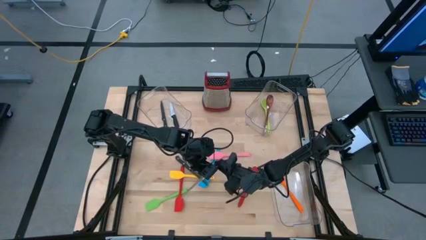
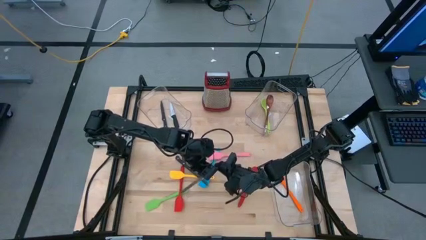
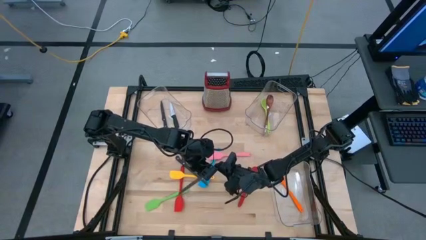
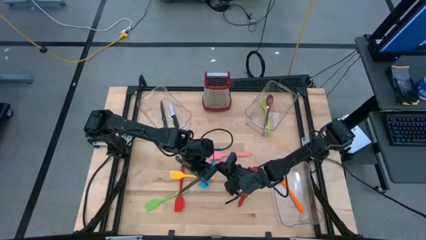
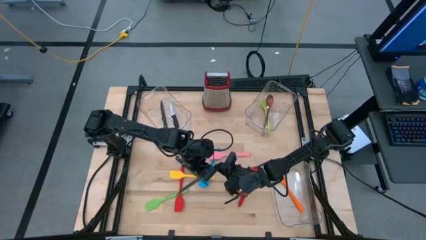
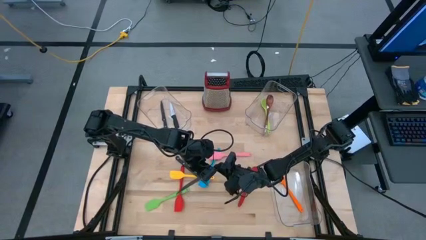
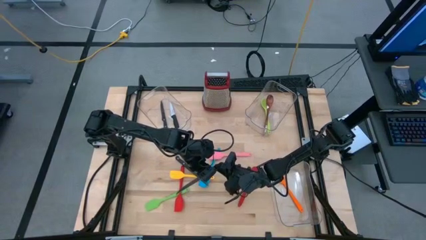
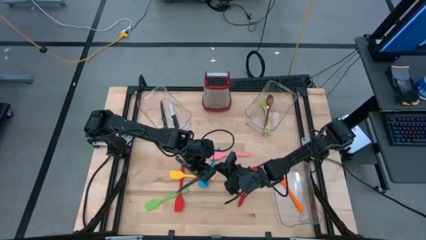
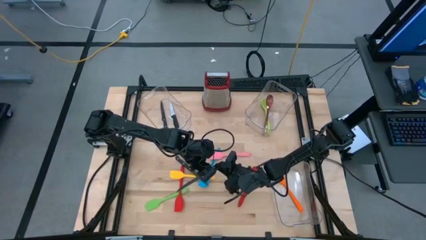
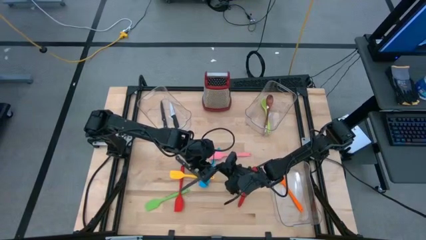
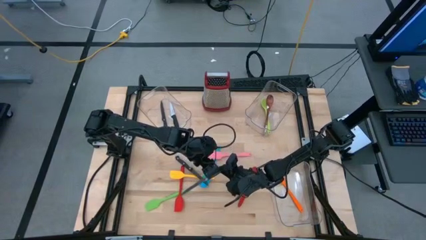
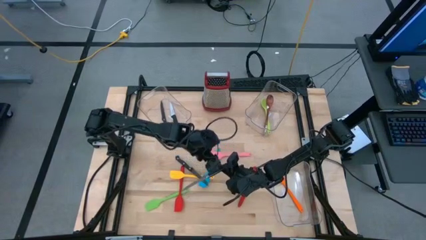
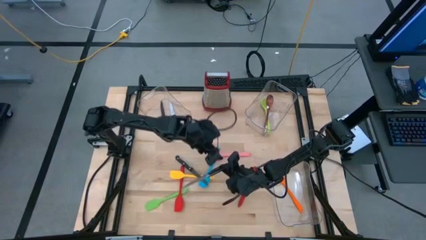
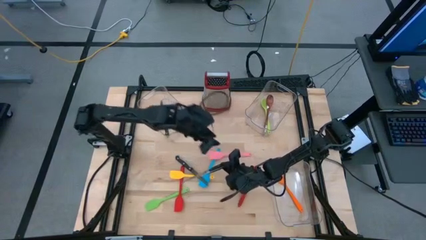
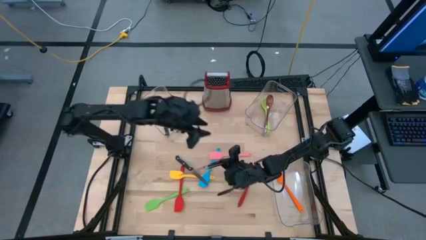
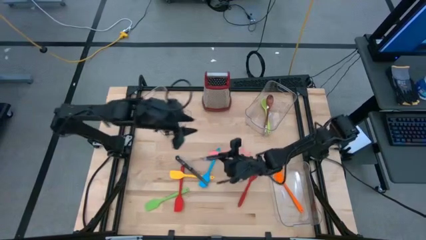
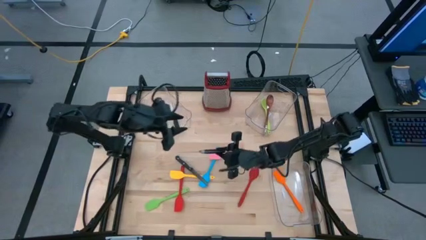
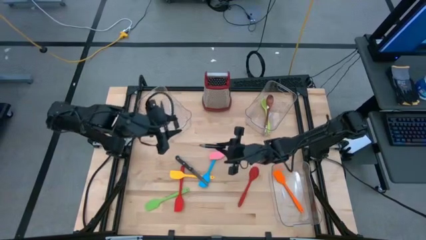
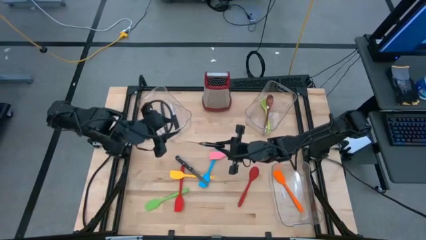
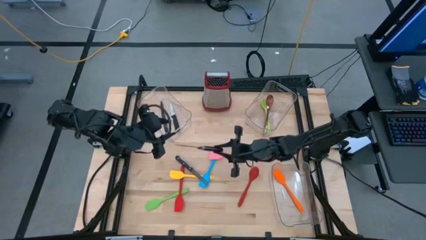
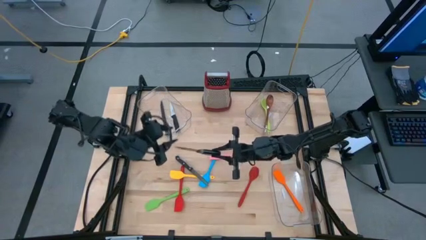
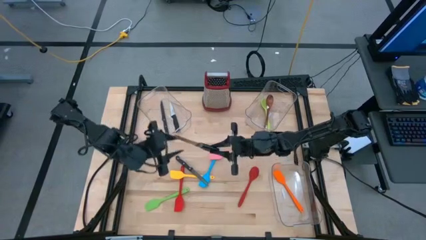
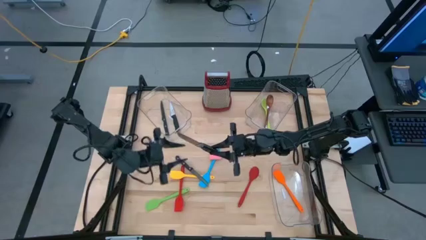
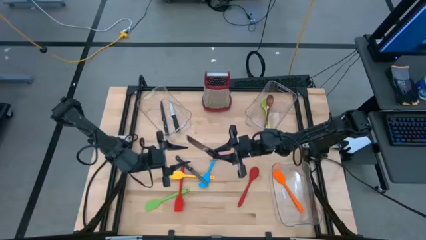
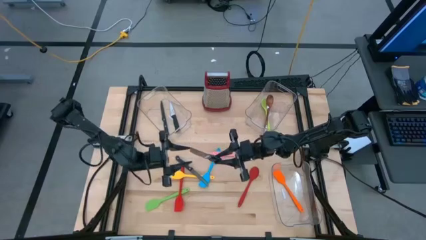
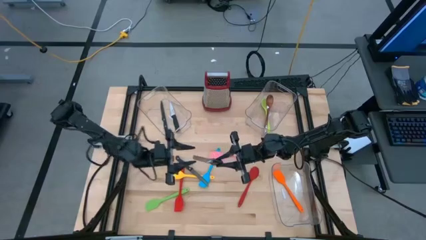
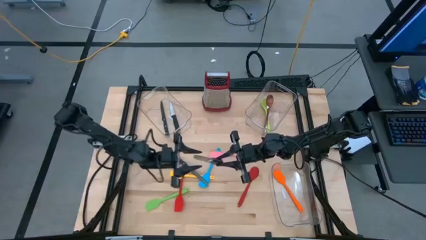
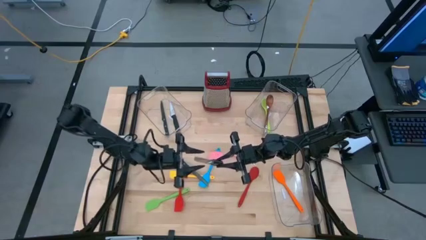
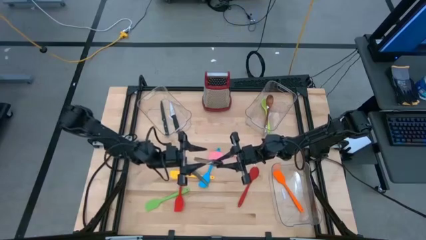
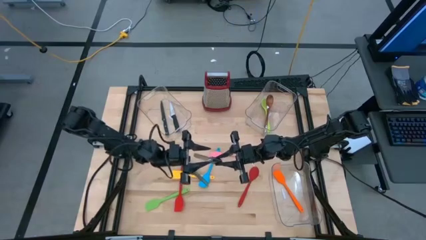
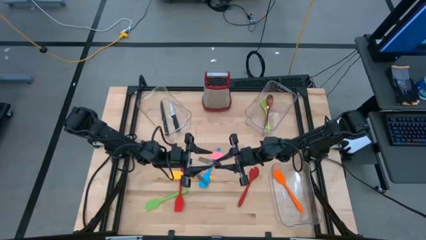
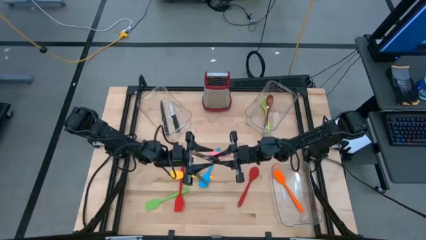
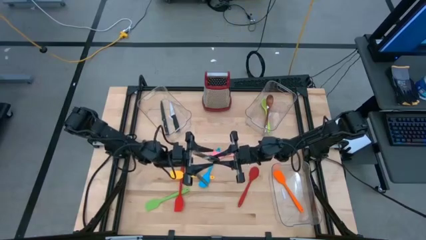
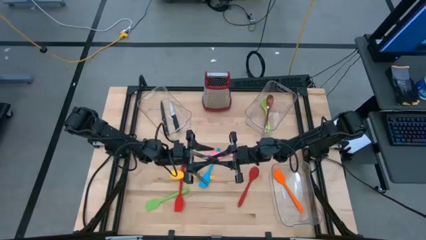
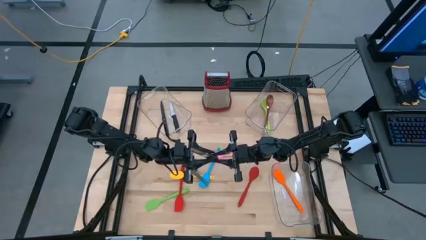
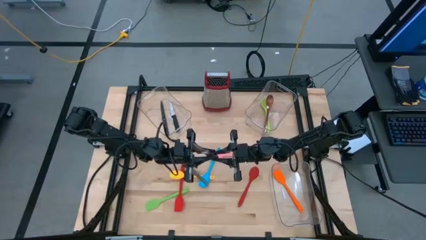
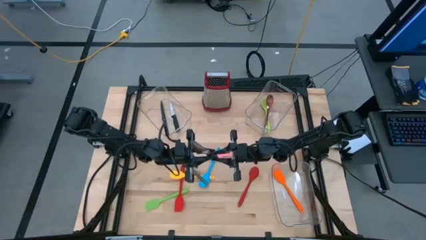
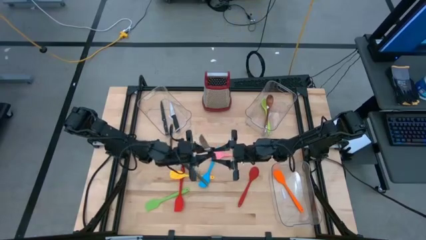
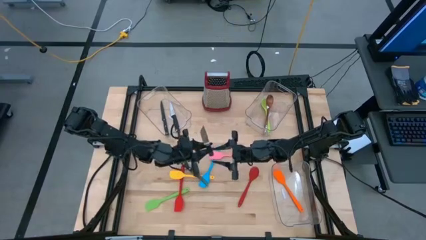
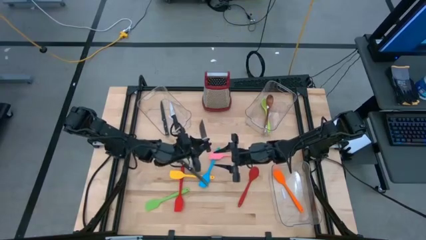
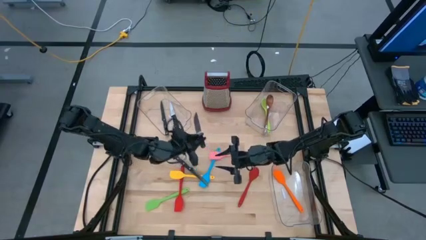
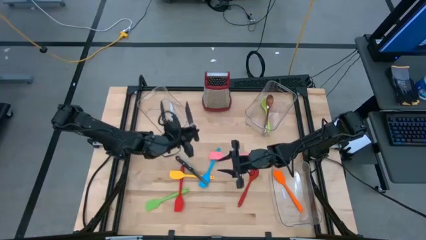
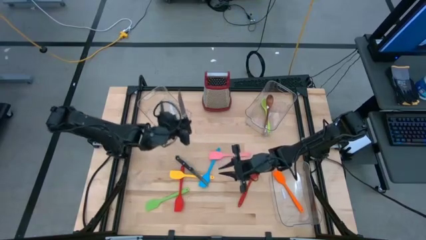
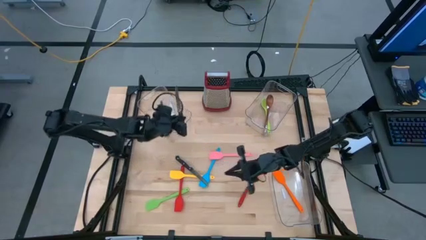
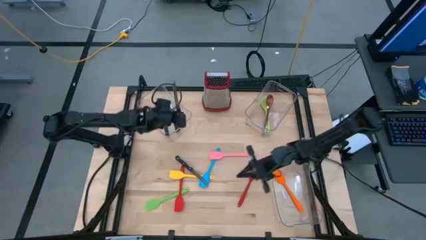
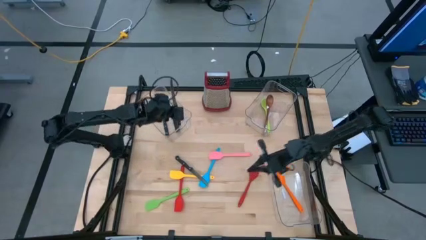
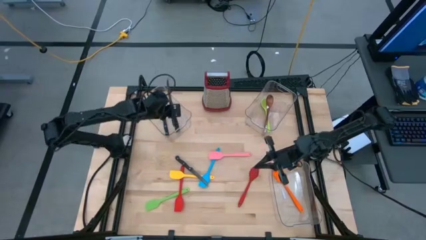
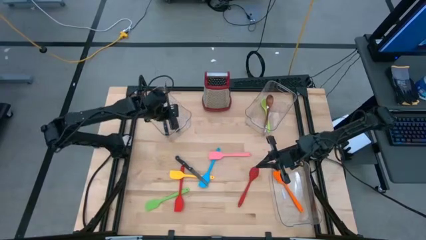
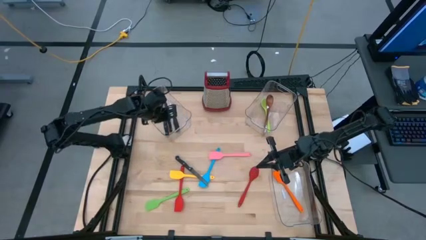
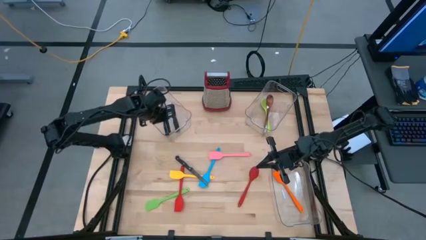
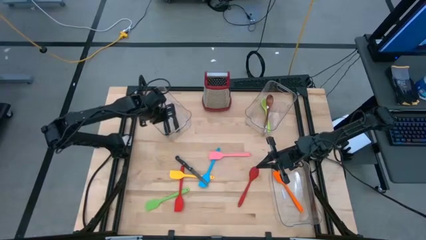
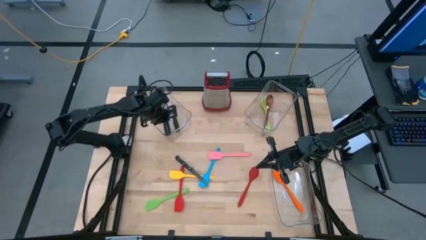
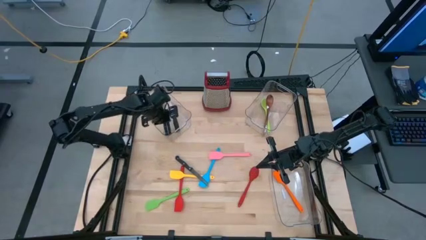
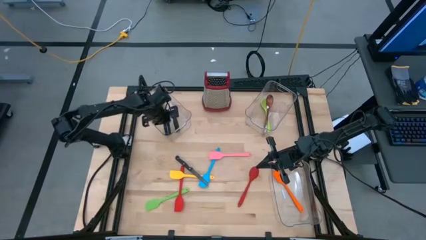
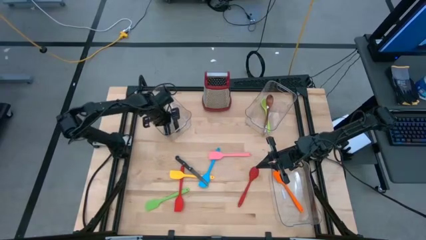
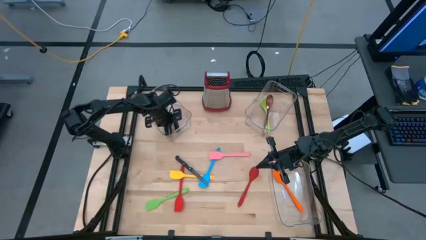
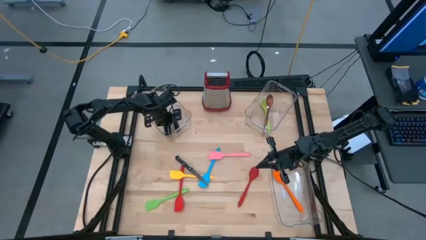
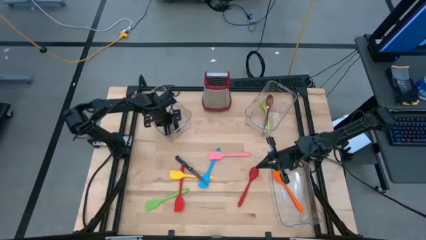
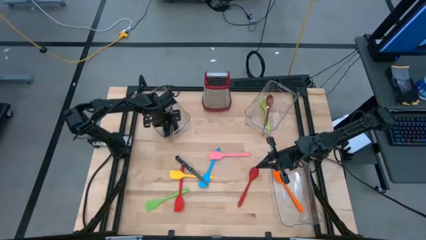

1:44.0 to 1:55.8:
Task: Pick & Place Kitchen Items
Put the silver knife into the top left transparent bin
